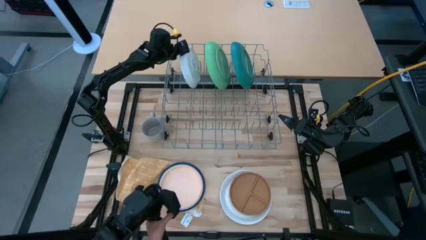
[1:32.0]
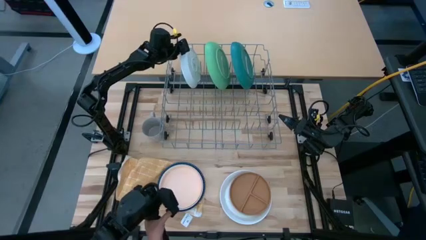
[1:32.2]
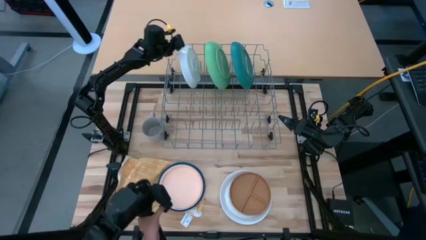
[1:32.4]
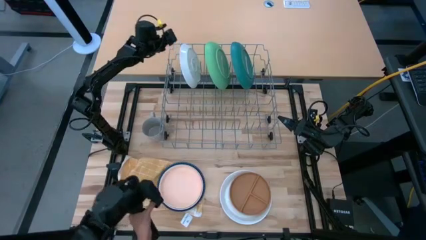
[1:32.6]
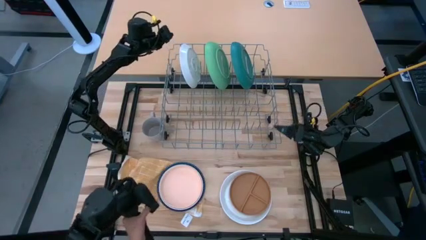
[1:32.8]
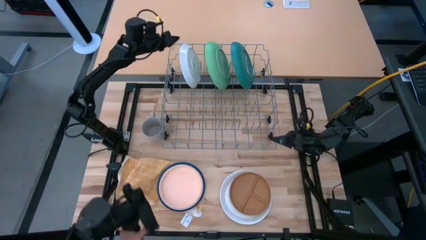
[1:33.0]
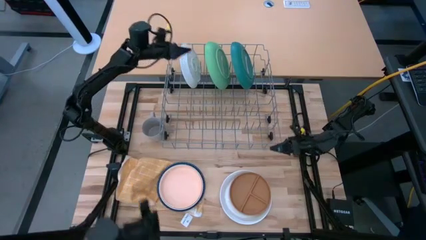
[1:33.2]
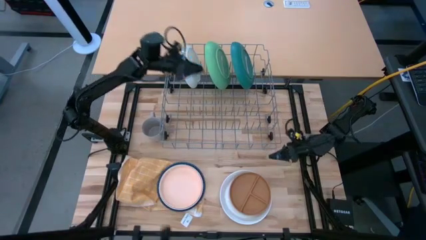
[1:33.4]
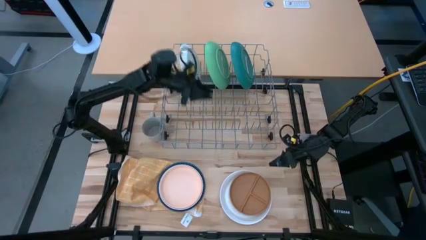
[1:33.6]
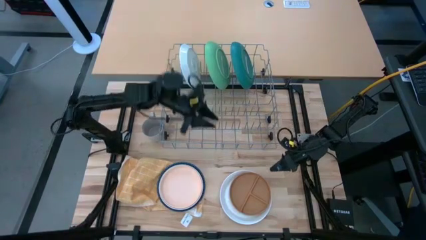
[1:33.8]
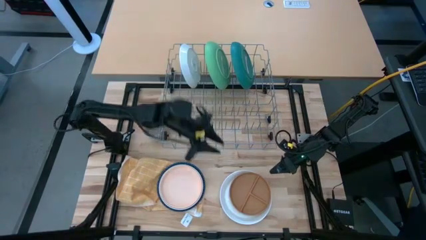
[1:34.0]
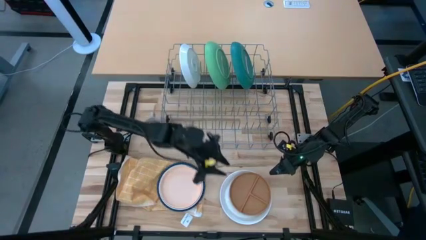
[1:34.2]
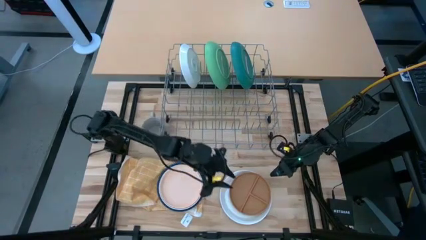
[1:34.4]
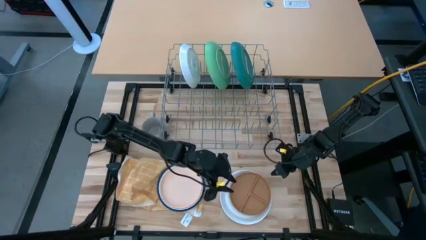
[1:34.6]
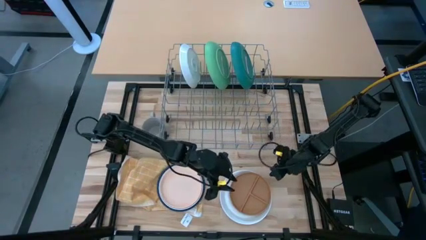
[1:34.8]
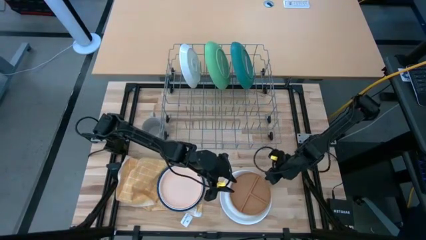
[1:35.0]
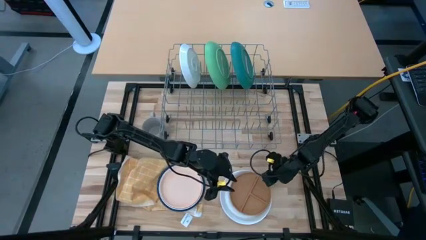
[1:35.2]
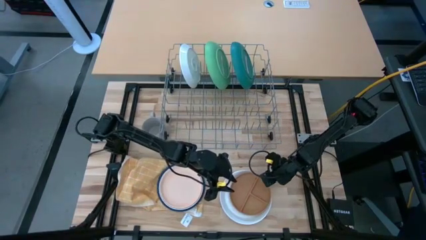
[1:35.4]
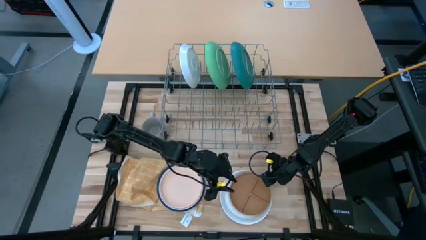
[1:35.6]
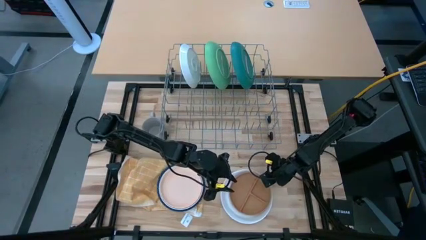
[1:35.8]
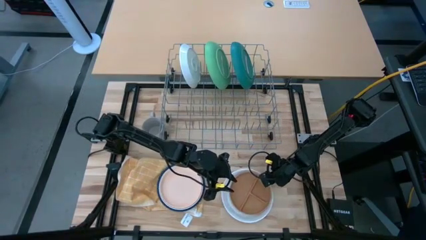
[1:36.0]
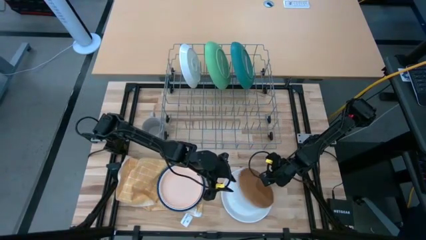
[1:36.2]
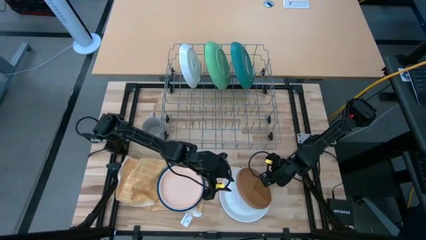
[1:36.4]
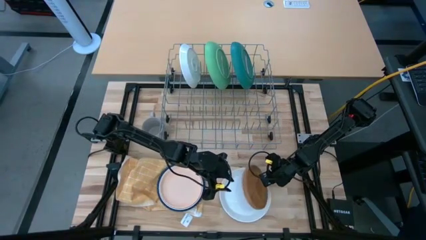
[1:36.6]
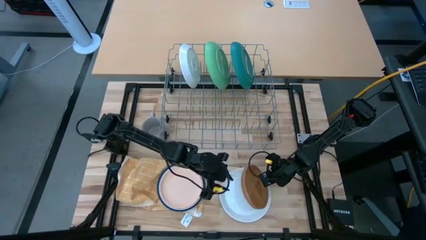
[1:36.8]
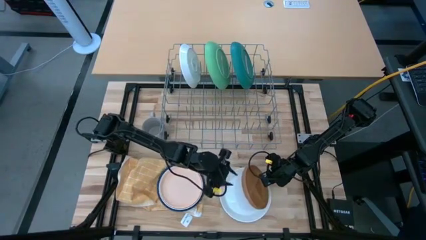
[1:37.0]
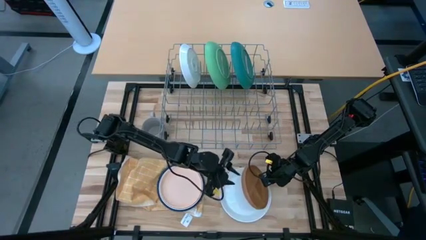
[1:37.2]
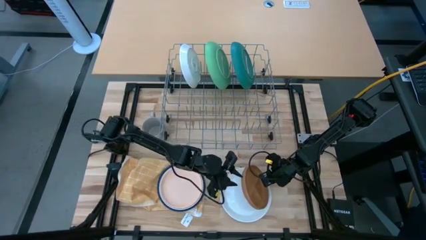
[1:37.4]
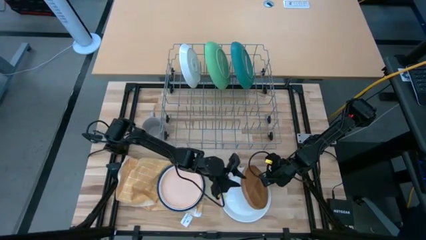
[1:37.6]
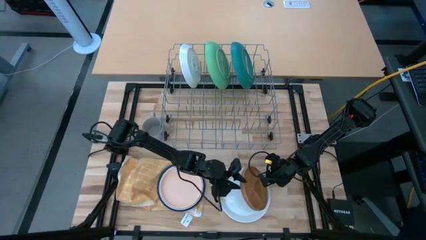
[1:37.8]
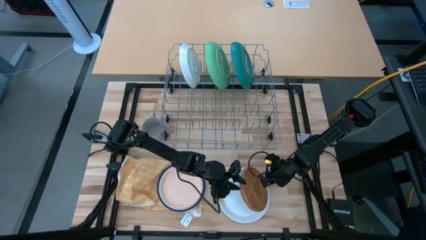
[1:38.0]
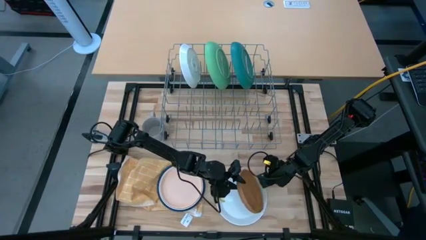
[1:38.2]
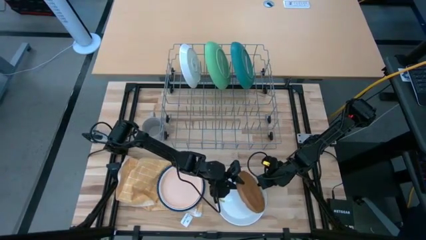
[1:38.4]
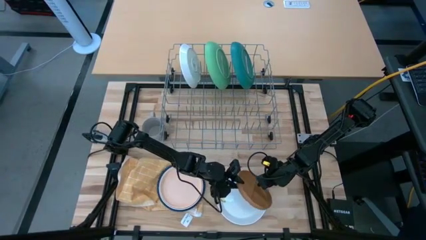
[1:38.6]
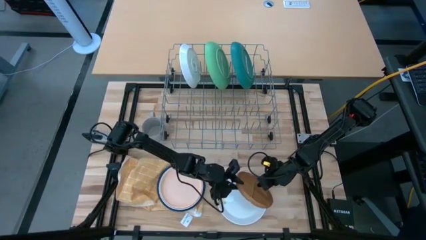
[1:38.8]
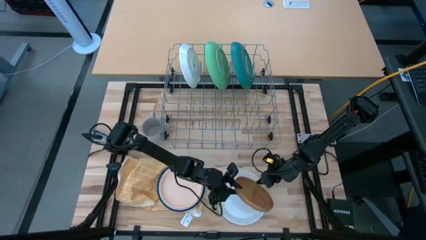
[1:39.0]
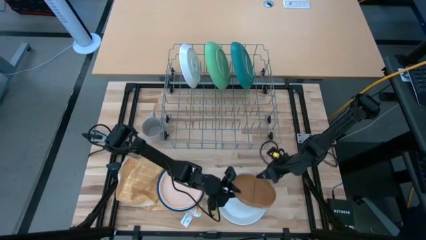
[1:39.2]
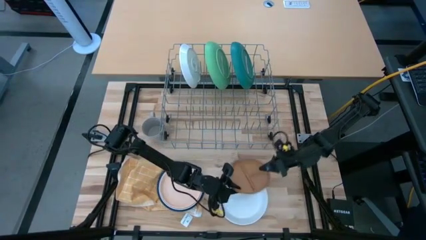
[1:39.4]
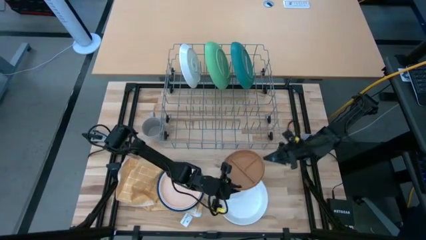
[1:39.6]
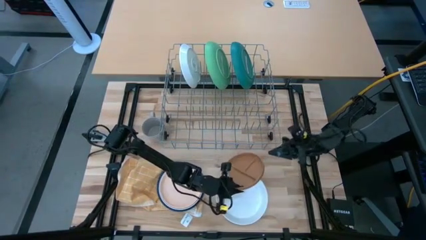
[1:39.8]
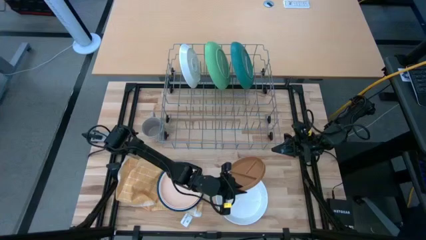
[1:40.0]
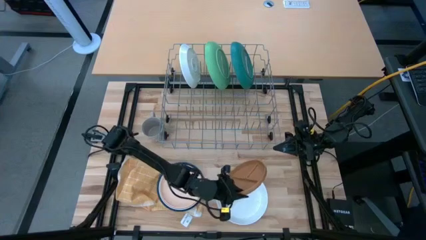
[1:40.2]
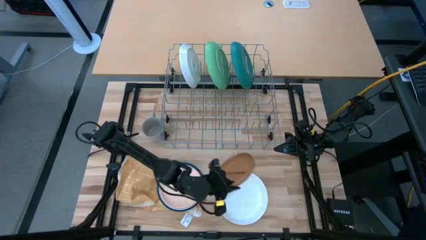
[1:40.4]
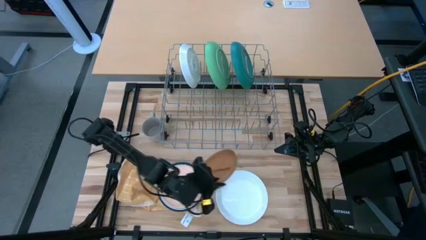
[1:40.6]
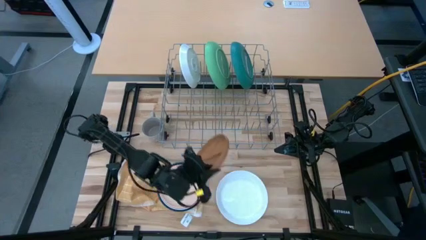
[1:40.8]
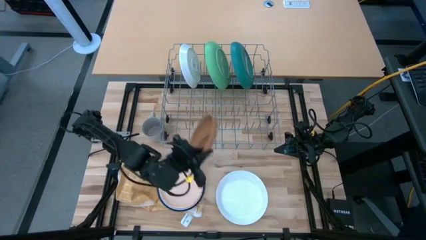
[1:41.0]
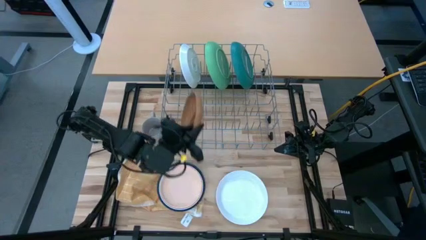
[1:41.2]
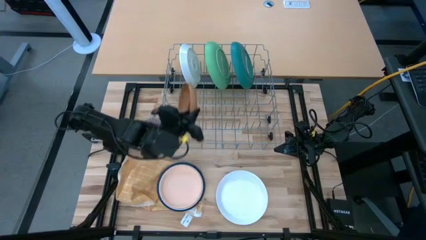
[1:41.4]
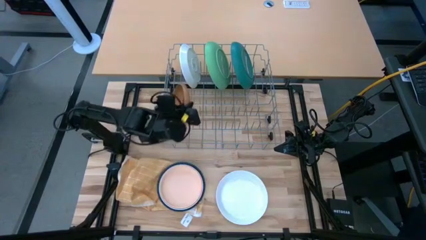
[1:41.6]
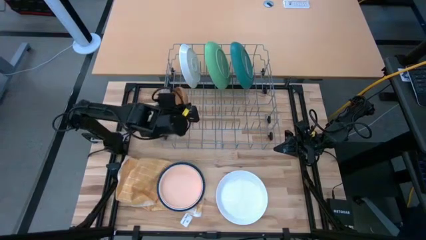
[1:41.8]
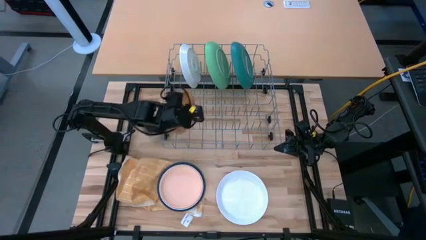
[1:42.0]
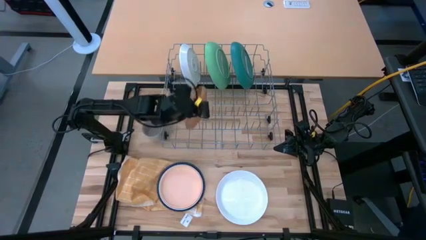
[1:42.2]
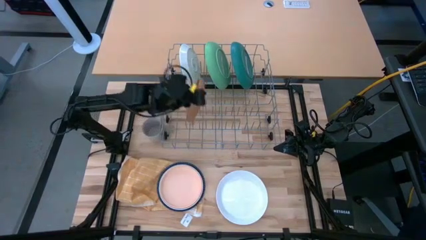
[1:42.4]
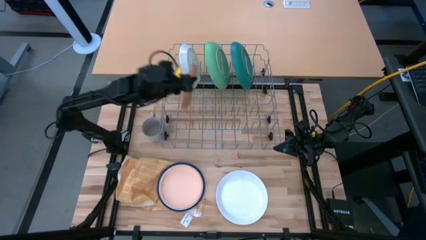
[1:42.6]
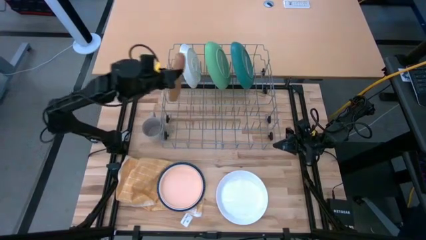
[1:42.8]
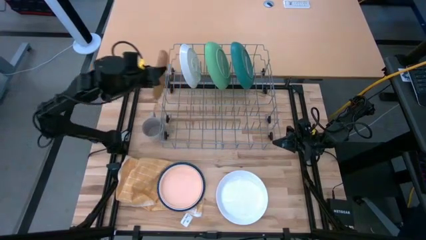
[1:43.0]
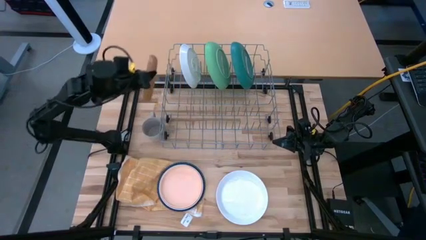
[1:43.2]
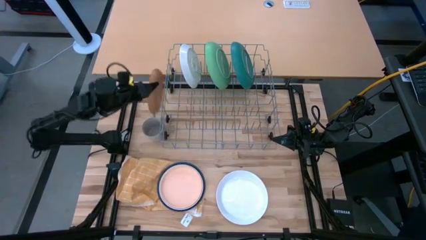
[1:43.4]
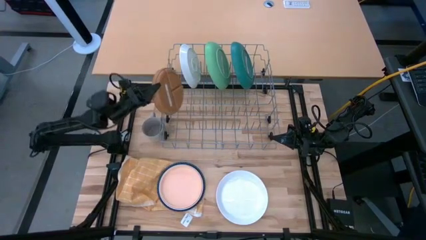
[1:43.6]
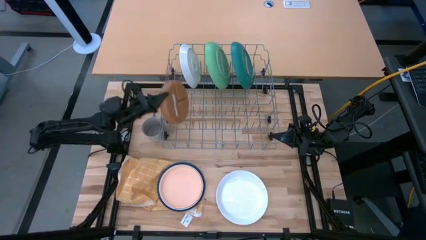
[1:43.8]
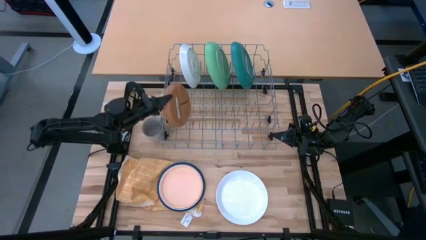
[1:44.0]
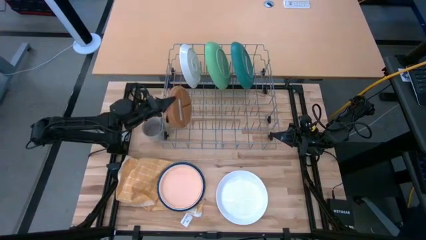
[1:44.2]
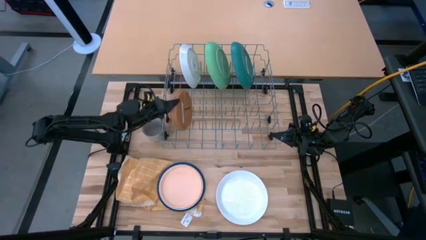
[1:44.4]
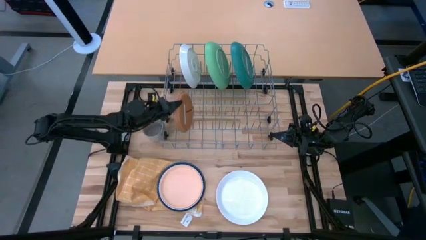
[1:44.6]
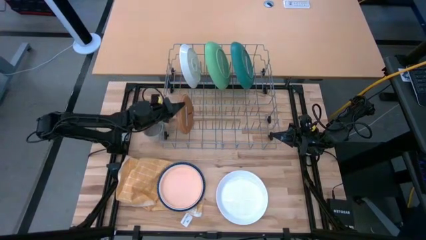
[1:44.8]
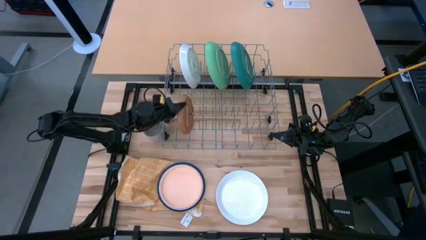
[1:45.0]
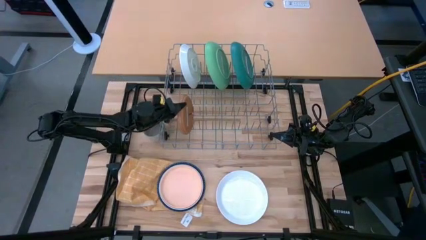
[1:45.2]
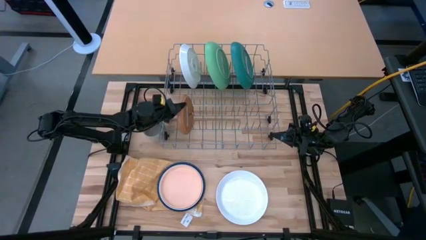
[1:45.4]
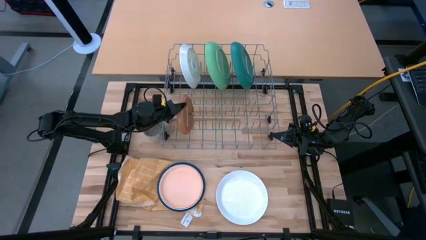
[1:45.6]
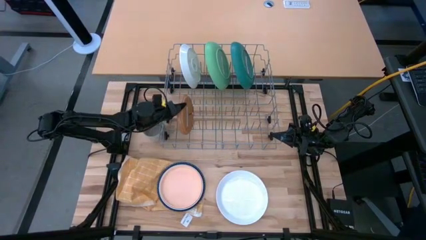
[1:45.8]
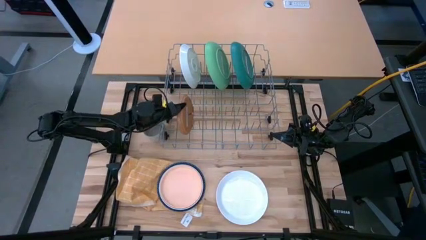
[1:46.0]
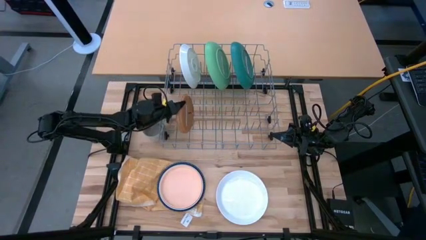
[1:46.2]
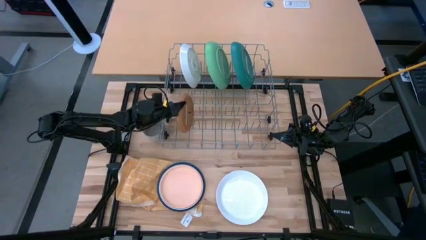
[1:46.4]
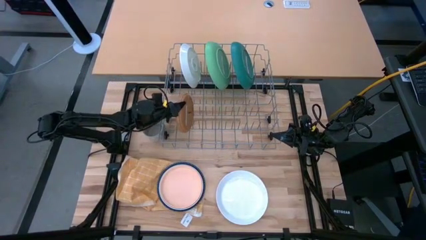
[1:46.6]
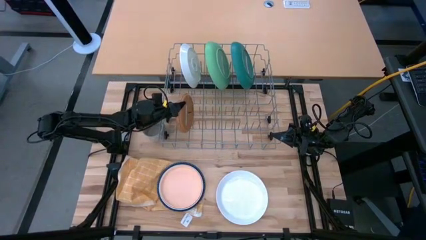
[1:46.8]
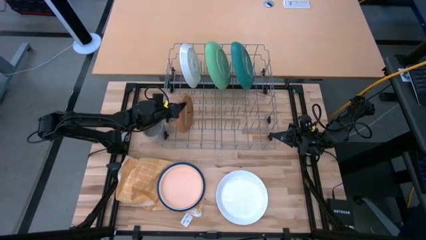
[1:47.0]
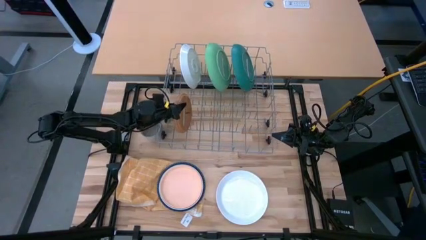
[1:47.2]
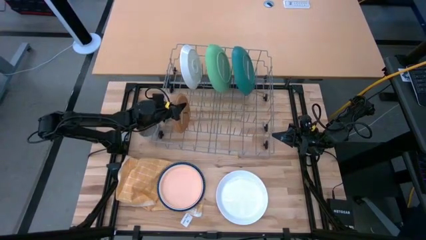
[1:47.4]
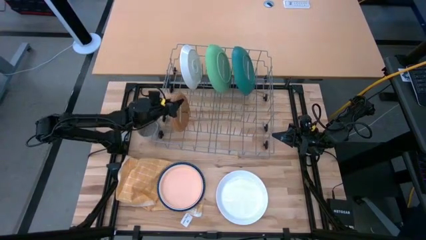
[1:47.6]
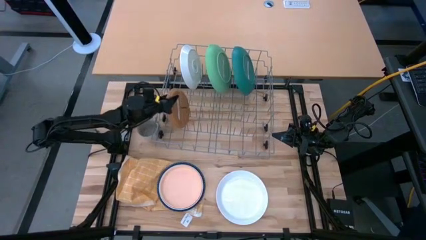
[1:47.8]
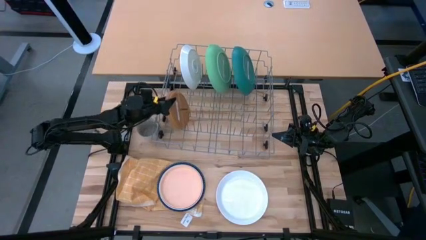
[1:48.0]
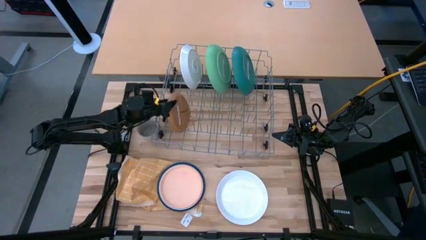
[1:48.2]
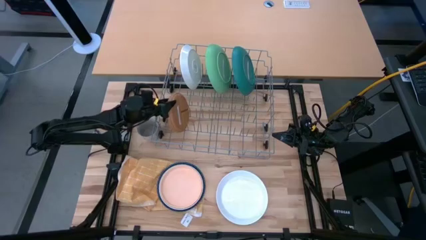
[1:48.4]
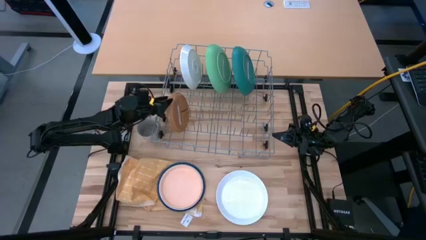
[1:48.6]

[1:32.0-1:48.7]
Task: Sort dishes
Put the brown plate in the dish rack
